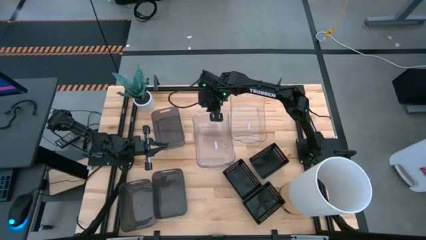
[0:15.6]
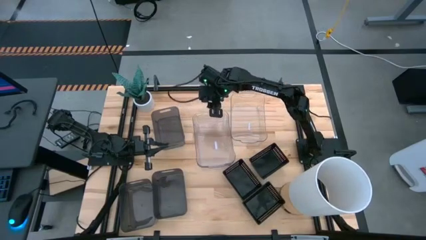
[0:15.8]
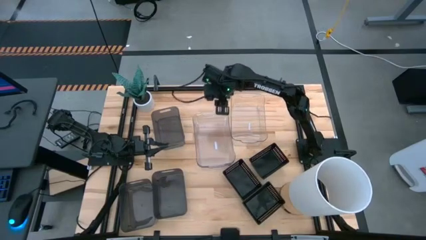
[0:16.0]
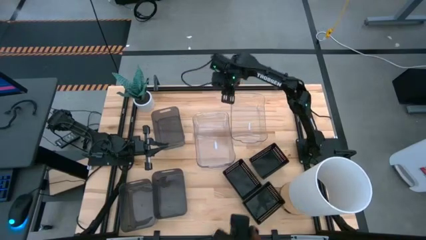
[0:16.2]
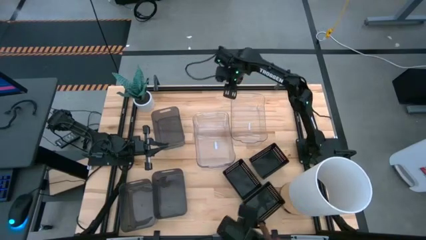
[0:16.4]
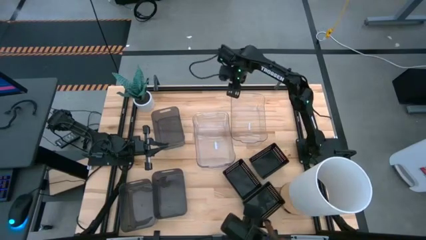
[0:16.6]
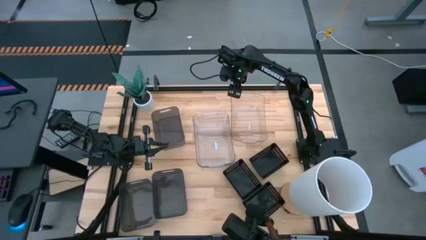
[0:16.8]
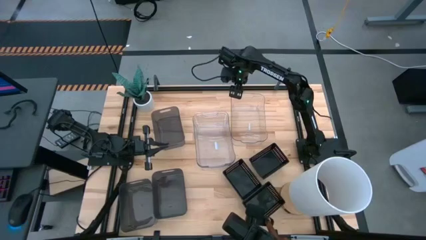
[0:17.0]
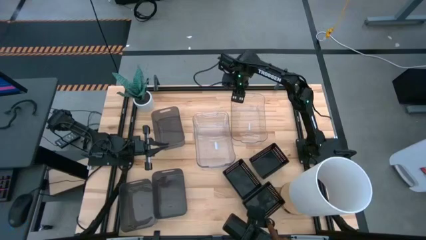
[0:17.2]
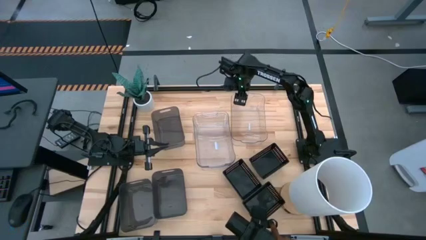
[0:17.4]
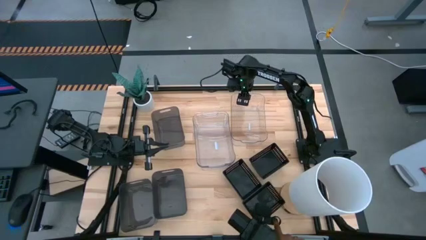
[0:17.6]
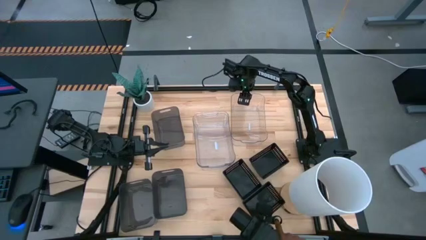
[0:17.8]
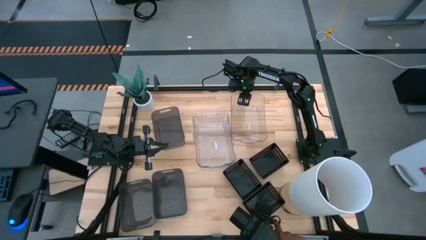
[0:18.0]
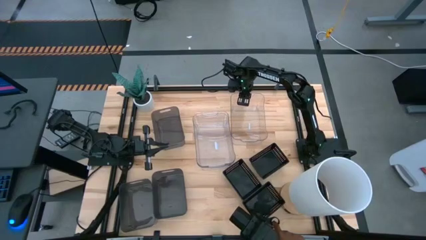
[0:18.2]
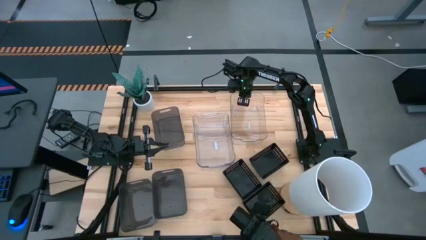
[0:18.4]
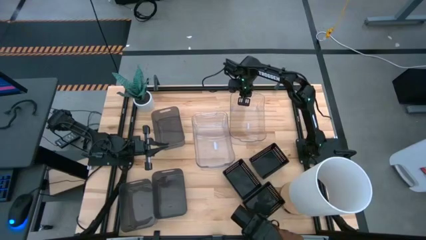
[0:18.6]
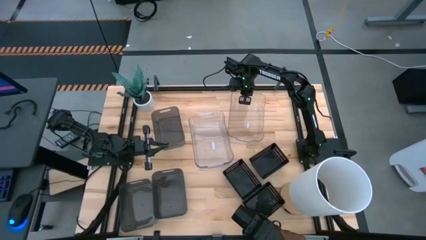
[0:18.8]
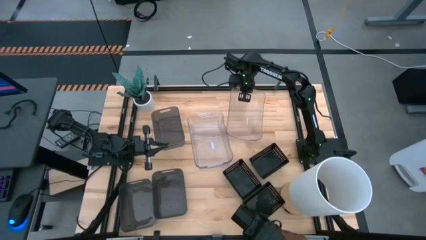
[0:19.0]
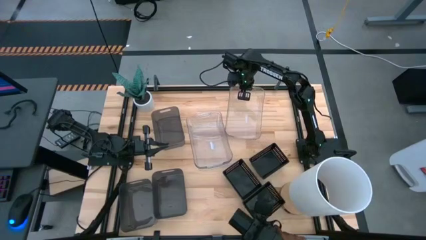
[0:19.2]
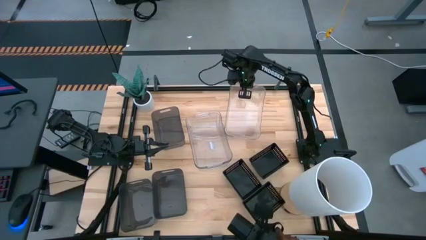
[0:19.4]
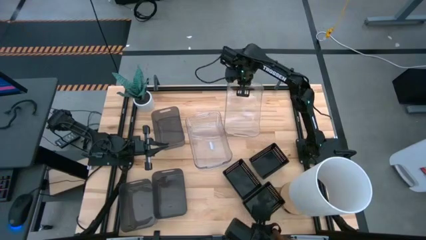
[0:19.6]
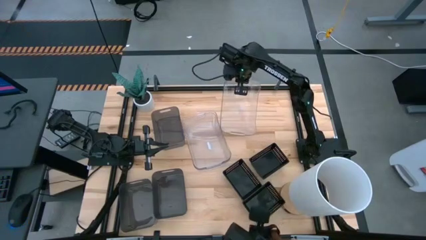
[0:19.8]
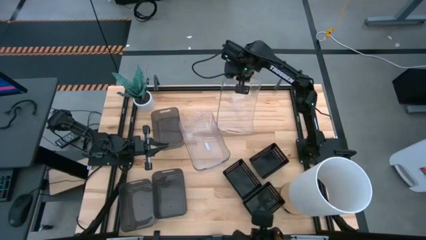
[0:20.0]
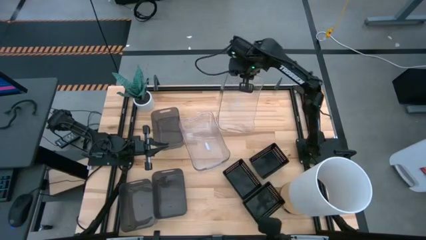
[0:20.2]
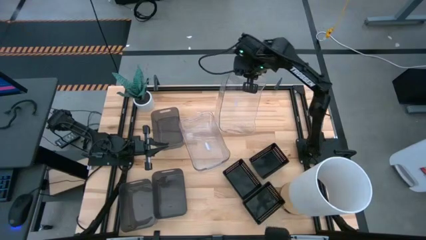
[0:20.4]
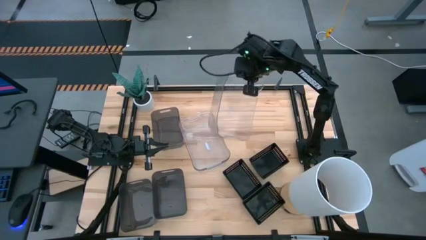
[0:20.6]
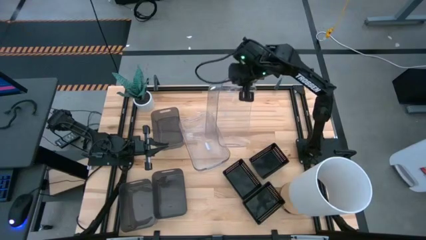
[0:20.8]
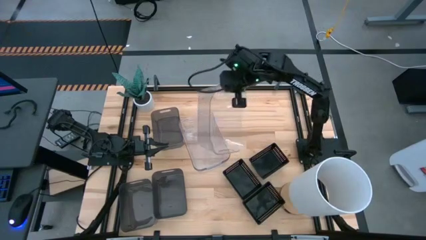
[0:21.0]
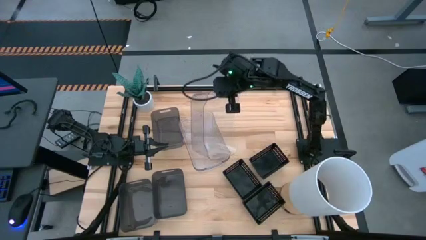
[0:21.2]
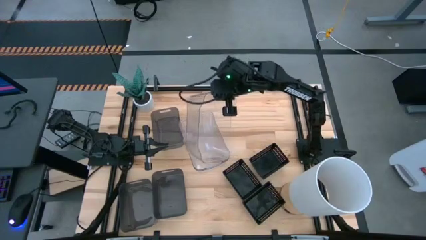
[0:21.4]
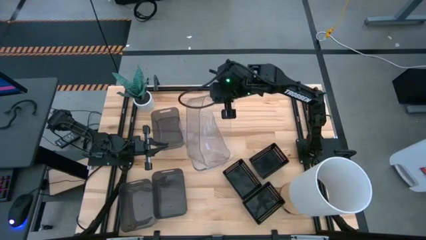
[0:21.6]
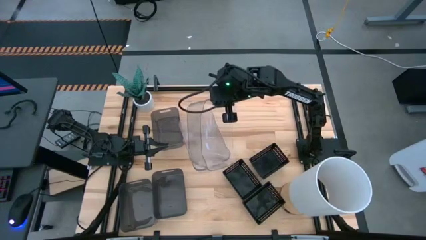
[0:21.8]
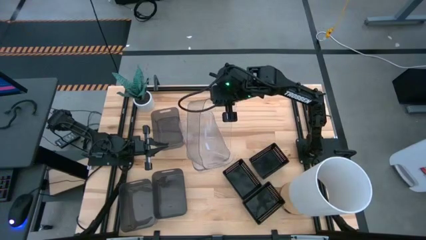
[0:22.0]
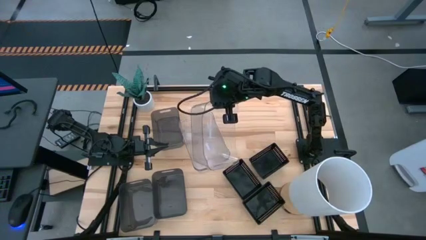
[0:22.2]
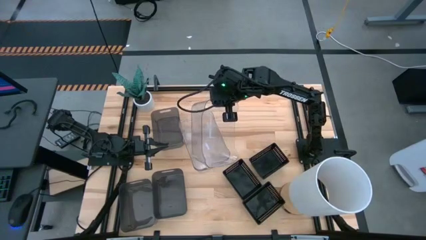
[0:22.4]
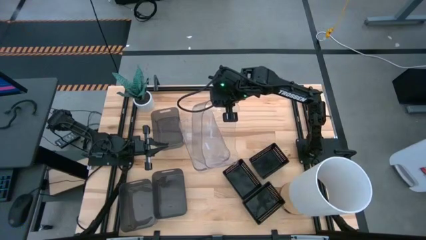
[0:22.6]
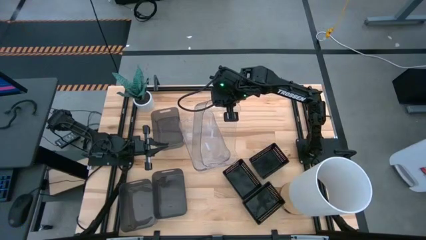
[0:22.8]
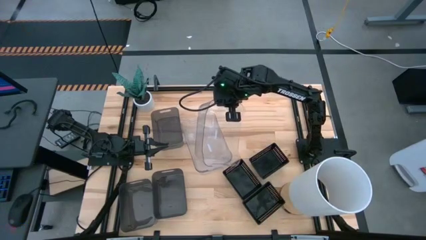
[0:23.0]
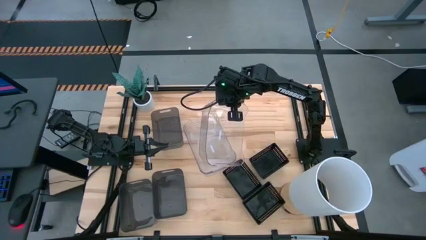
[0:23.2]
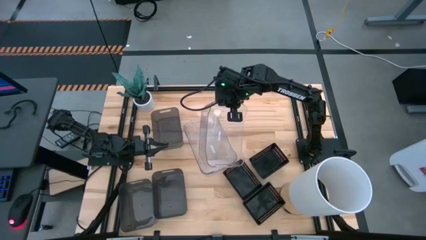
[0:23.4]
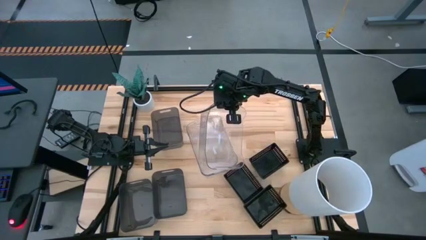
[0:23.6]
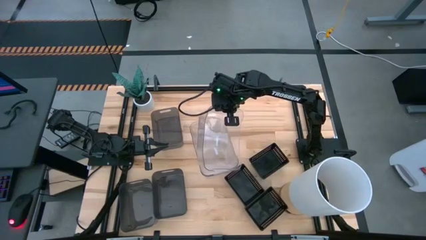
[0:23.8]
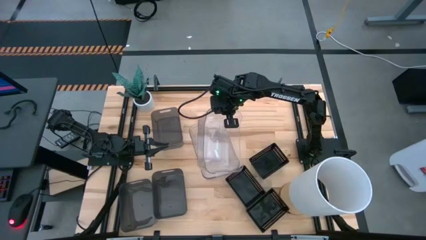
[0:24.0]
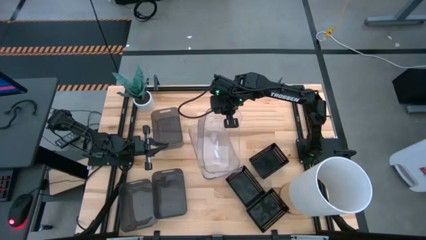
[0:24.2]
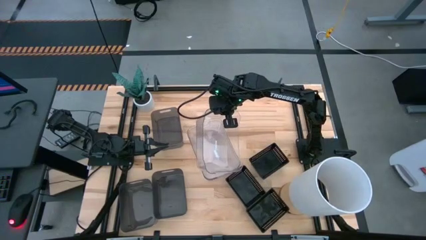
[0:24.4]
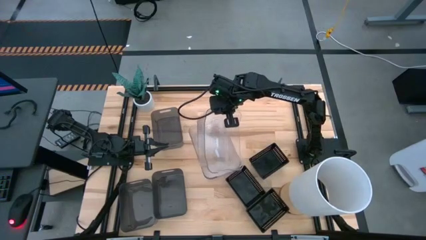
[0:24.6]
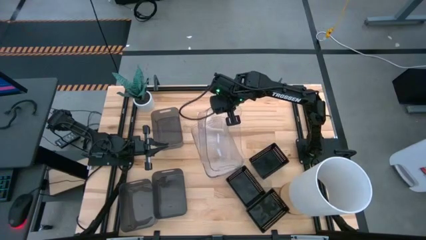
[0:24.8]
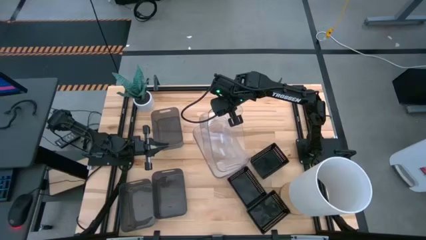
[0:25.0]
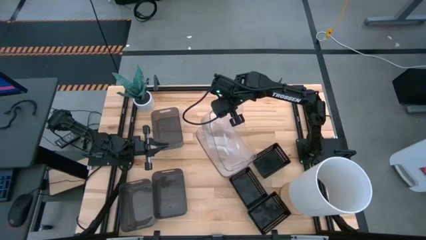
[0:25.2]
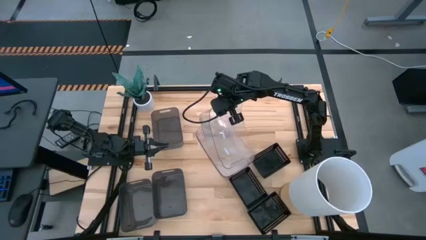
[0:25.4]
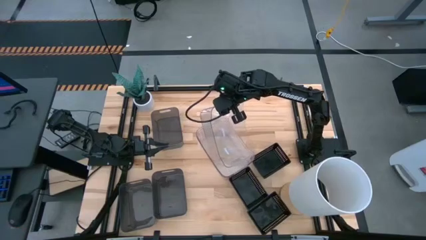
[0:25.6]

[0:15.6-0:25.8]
Stack the right transparent bin on the left transparent bin

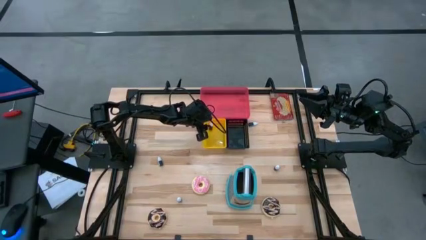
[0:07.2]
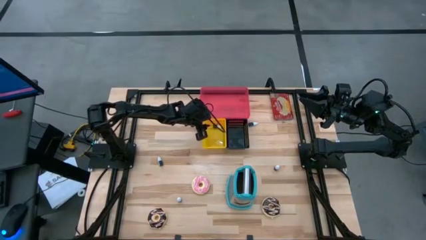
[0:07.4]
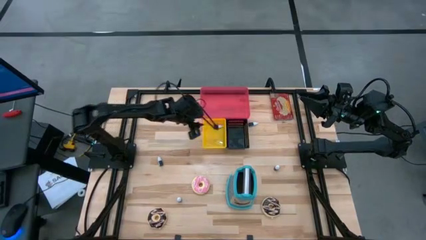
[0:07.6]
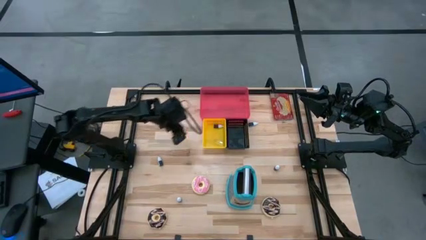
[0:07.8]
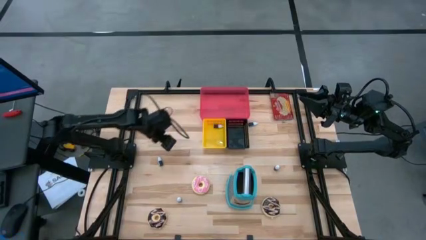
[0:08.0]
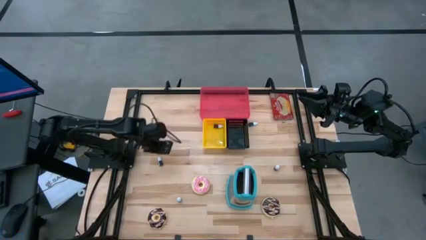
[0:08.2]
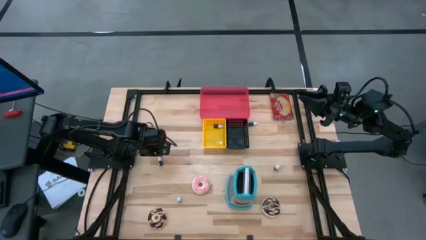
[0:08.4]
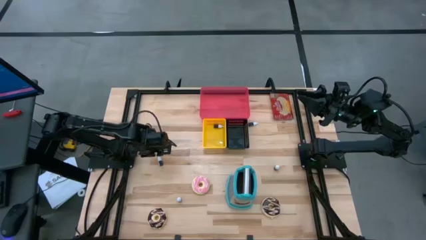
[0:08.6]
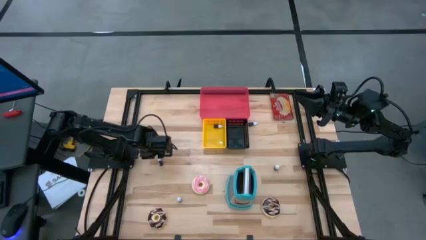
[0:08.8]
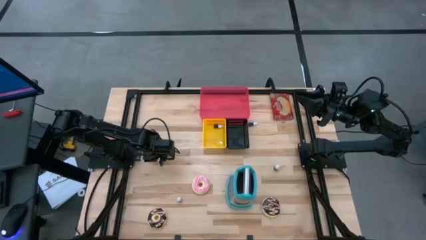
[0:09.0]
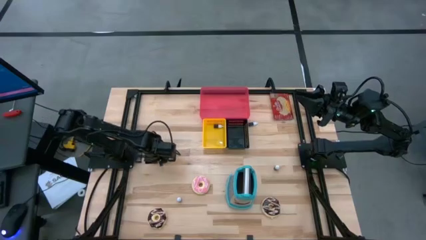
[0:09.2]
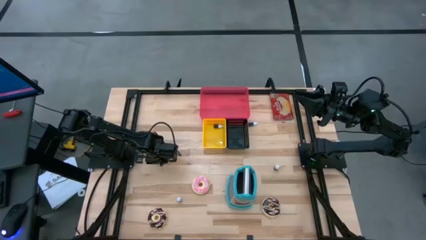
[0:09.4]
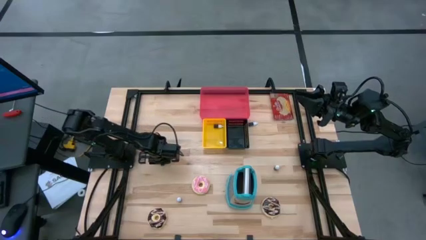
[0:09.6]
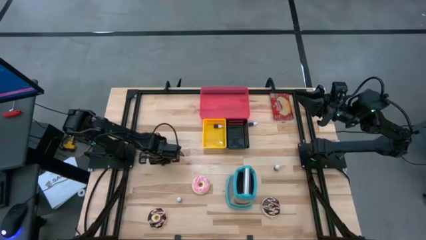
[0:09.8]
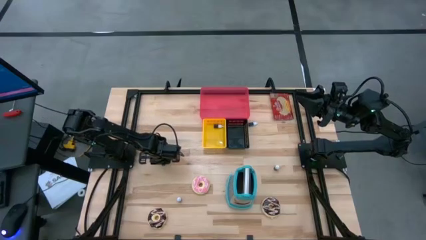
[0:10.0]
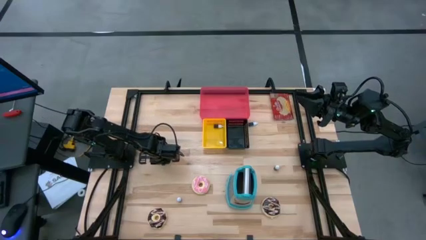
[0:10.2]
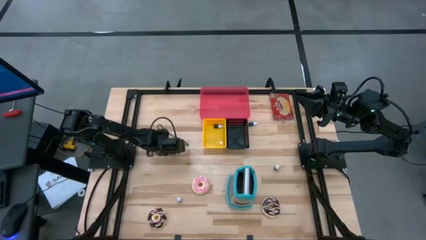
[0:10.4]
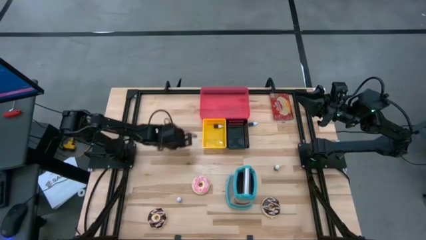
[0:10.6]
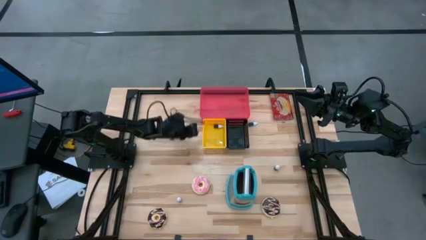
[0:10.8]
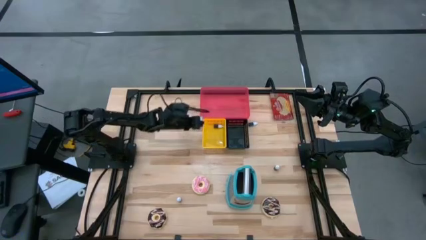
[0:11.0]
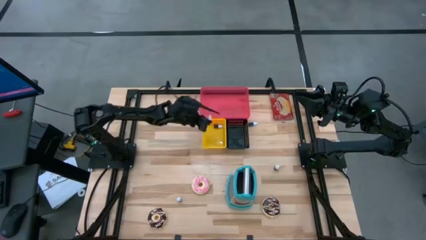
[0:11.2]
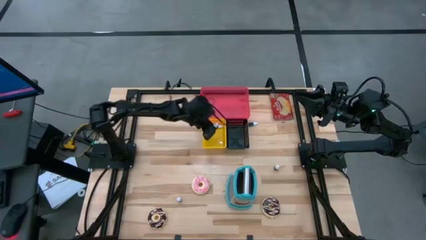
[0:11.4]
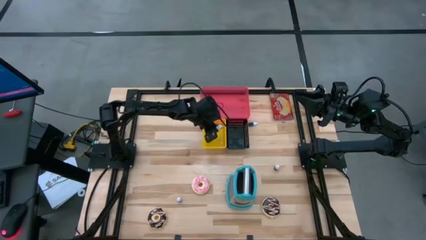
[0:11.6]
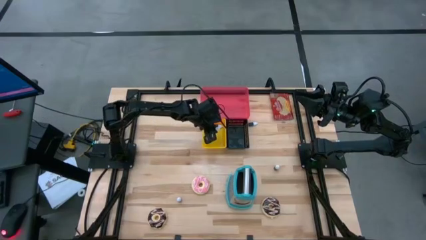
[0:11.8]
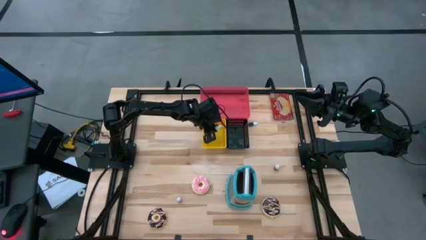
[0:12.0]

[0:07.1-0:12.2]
Put the white food coloring bottle into the yellow bin
